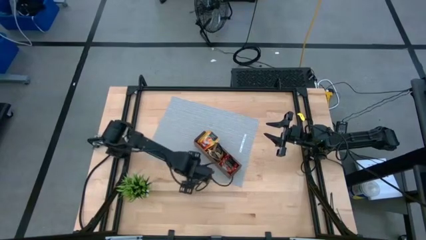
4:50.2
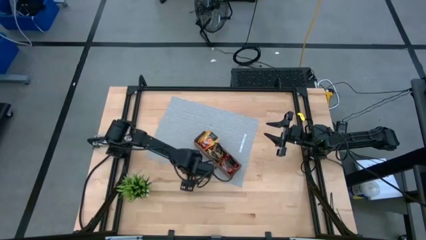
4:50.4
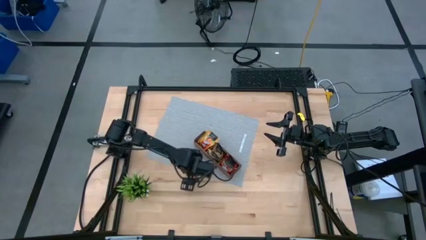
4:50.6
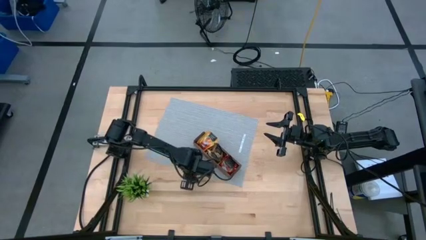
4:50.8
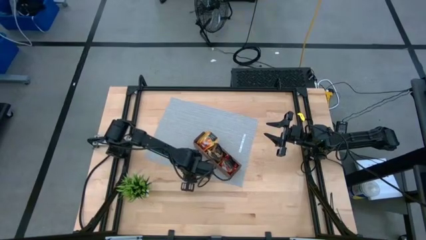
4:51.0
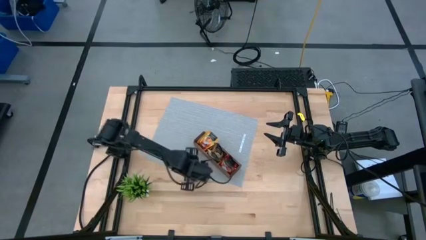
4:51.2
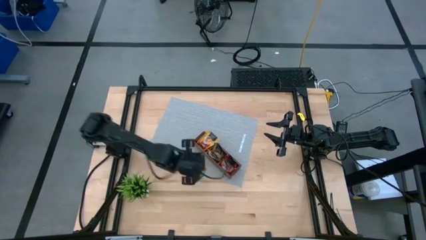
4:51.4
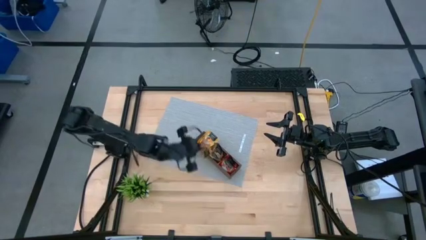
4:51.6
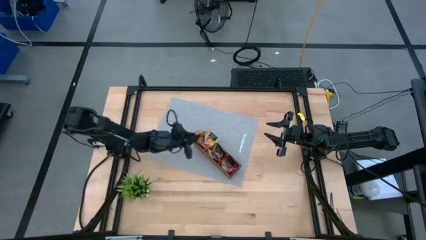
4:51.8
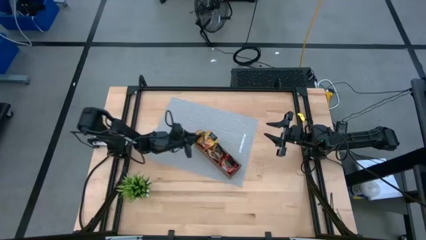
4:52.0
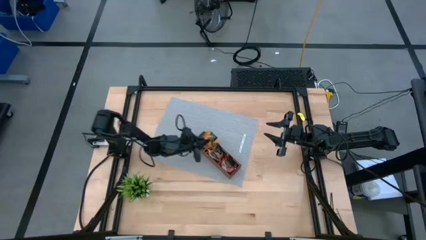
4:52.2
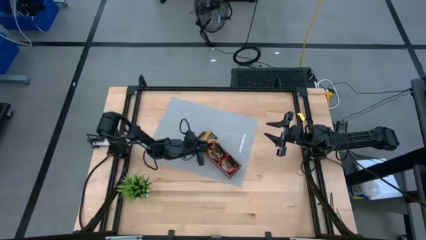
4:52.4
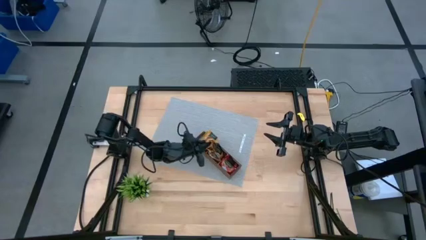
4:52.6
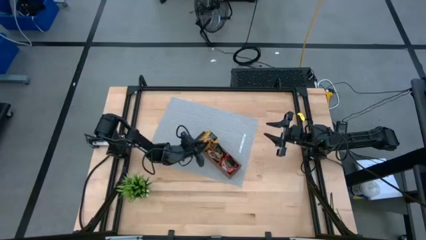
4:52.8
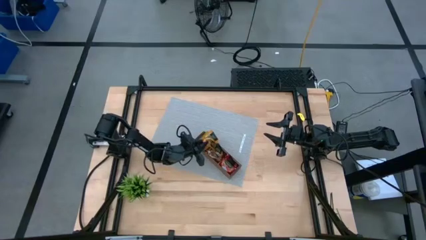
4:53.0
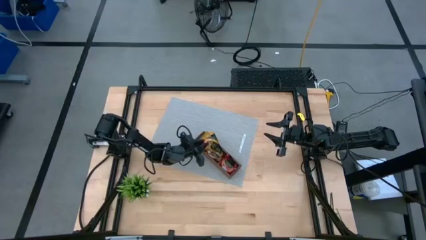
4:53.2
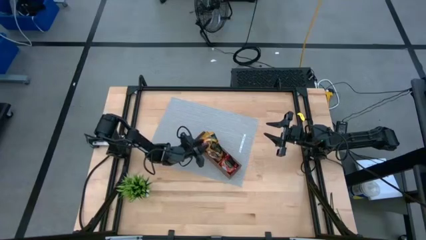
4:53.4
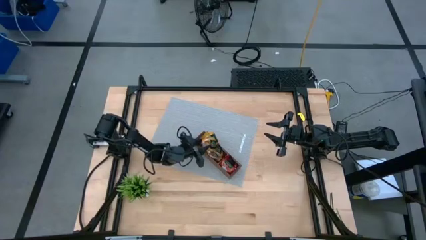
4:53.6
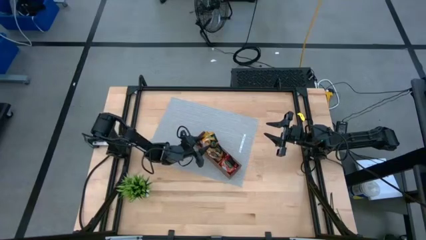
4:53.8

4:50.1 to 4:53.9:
Task: Pick & Place Tea
Put the yellow tea bag into the wooden organizer

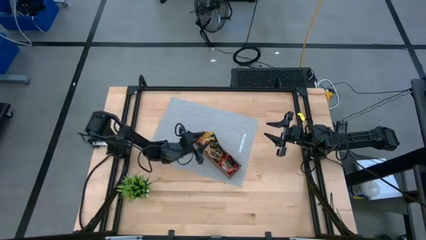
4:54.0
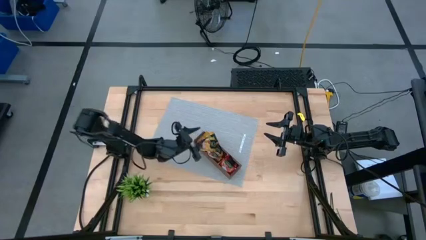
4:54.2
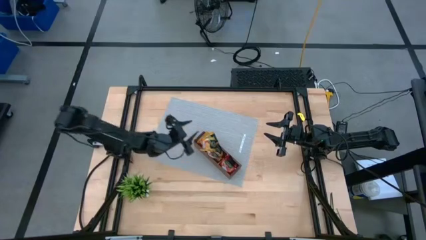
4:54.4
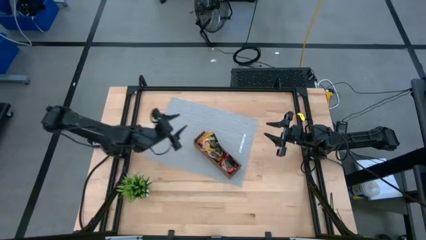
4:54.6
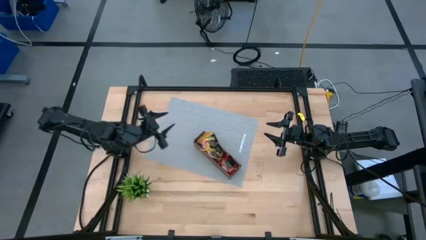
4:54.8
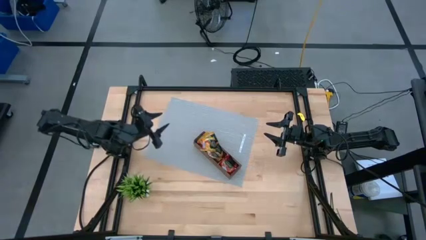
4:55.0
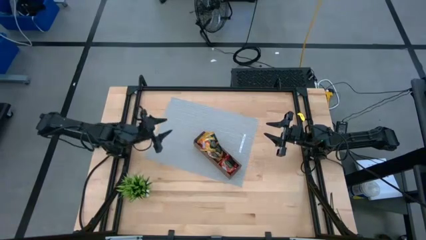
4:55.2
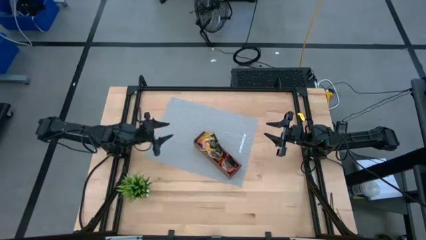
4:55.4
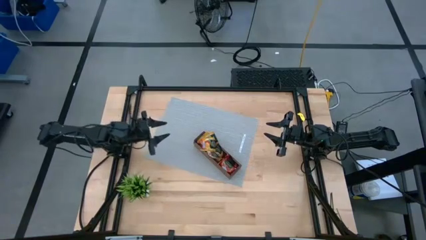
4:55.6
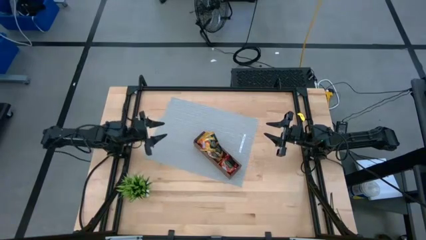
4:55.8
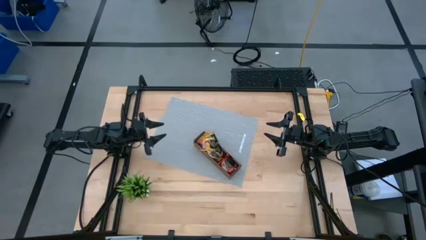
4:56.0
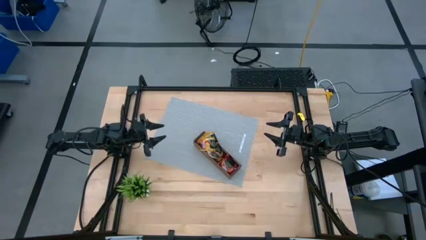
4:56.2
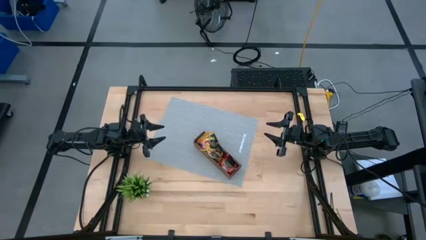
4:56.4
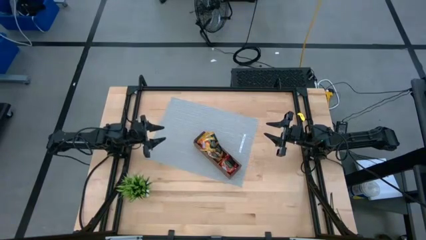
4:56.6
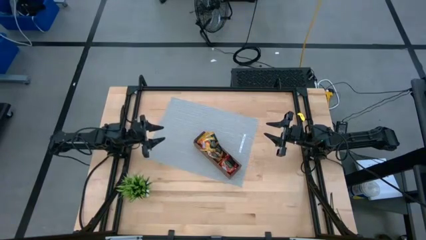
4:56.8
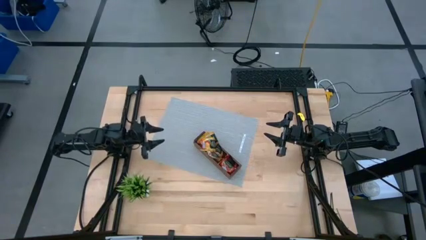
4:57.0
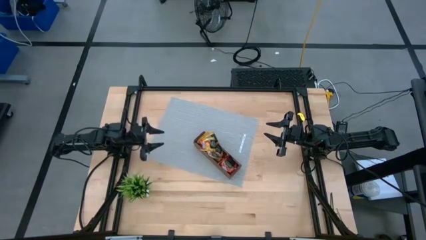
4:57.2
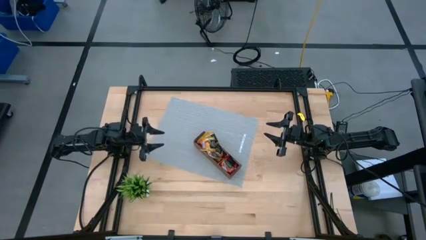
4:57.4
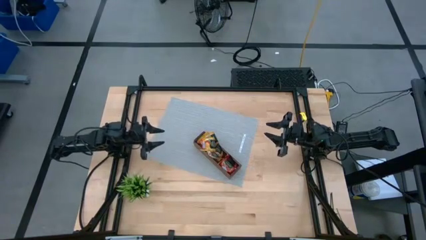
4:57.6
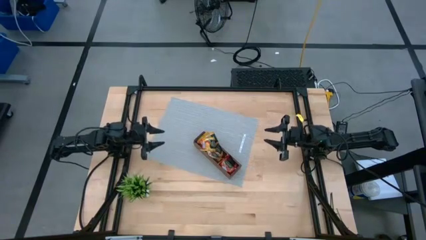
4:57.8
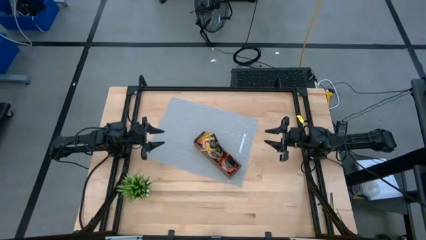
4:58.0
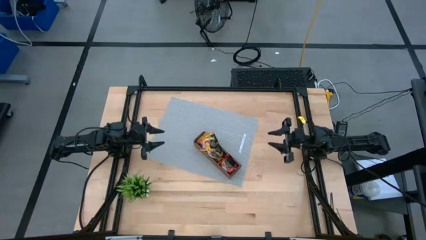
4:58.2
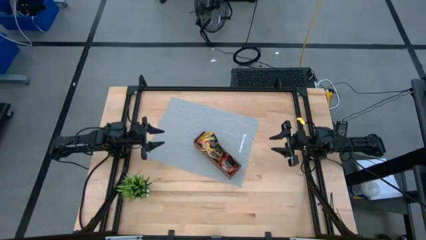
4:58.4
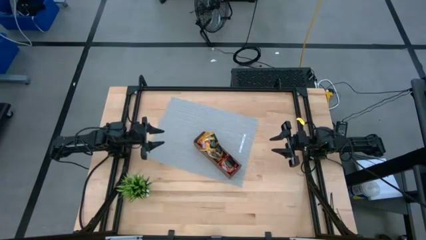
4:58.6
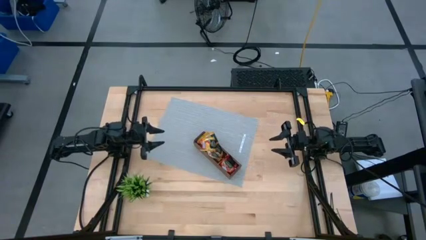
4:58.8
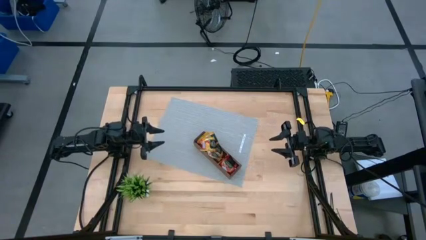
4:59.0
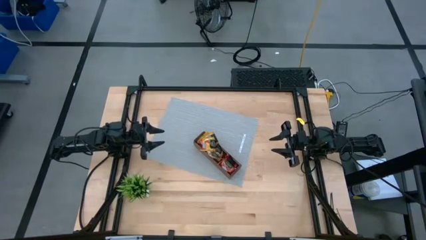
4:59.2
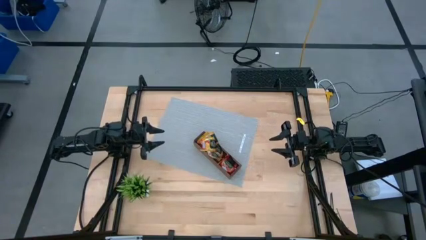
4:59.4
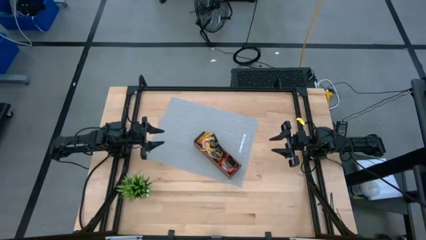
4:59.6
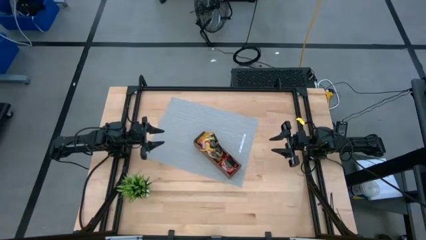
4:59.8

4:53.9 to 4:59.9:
Return to Home Position

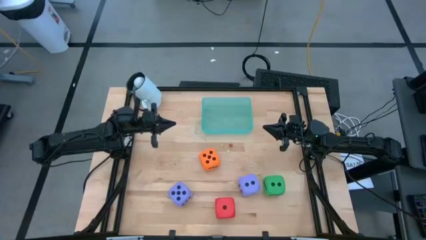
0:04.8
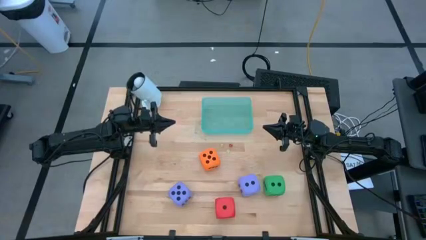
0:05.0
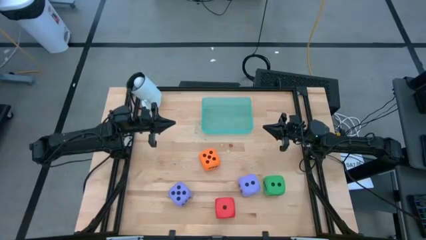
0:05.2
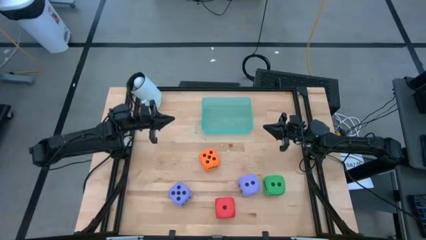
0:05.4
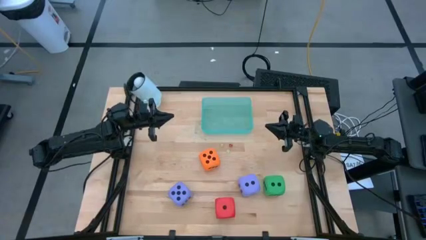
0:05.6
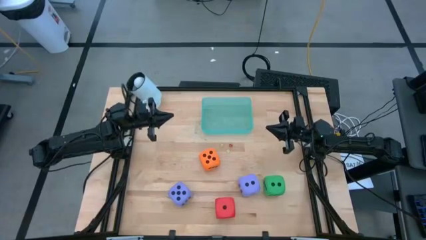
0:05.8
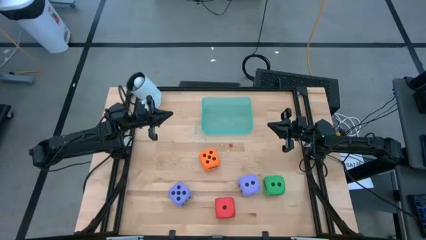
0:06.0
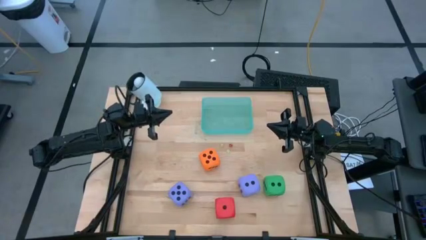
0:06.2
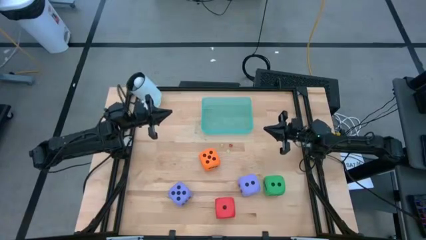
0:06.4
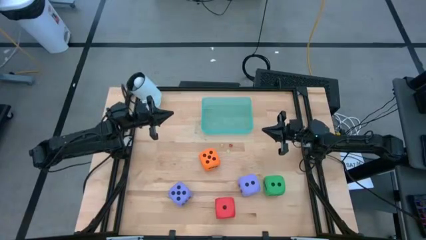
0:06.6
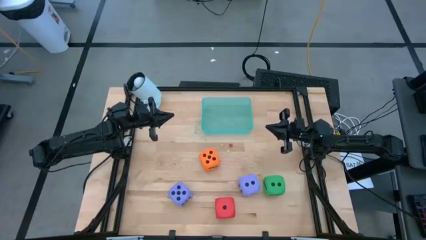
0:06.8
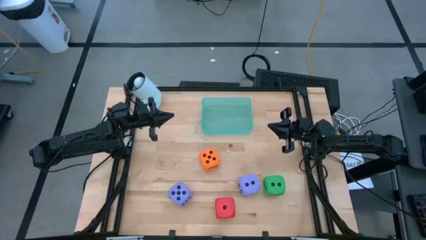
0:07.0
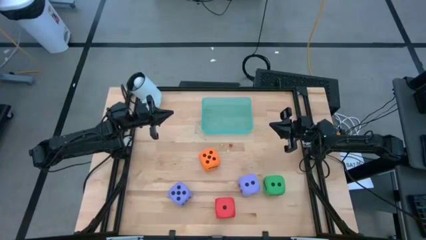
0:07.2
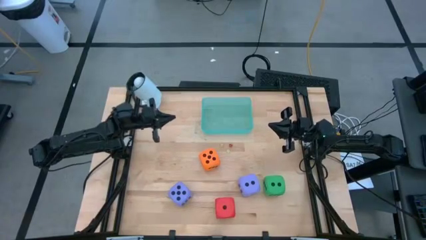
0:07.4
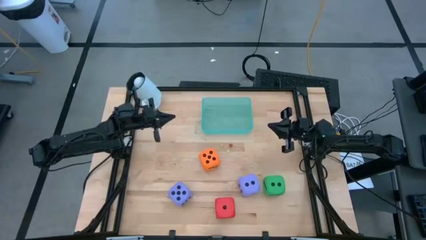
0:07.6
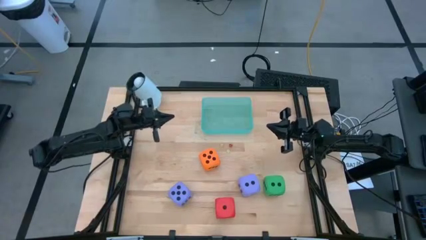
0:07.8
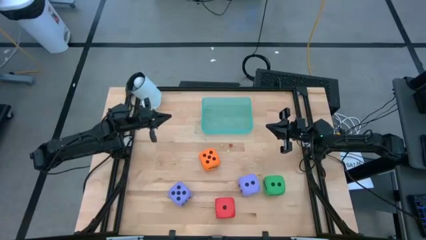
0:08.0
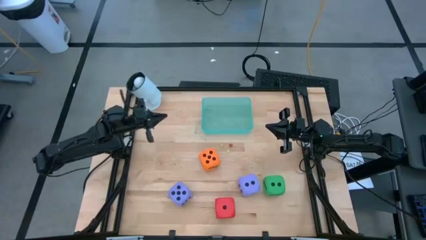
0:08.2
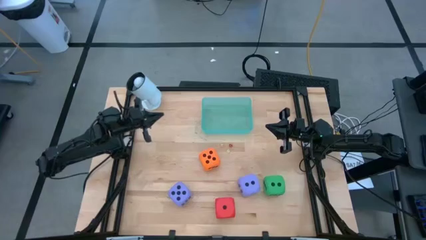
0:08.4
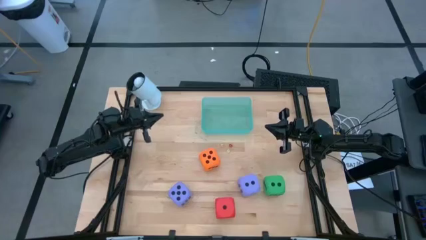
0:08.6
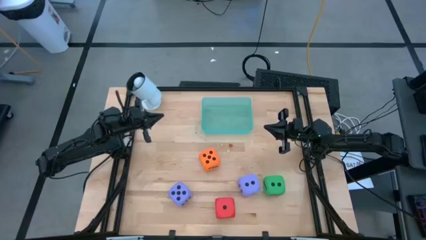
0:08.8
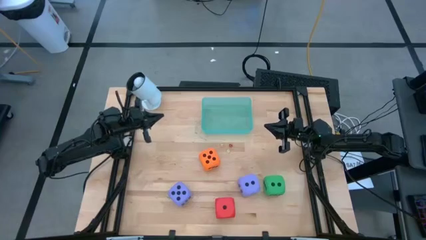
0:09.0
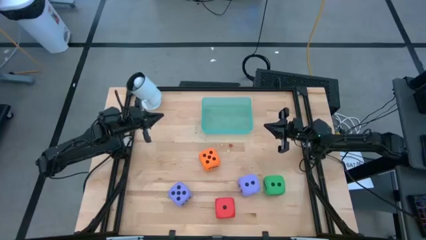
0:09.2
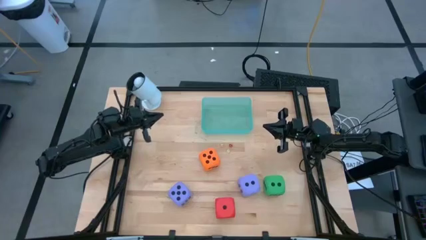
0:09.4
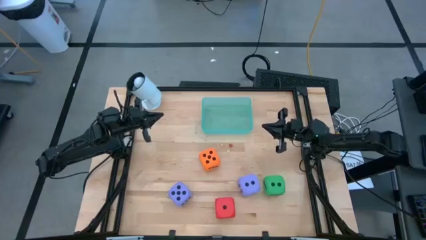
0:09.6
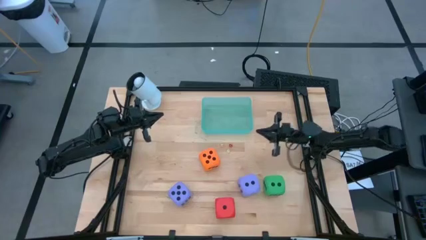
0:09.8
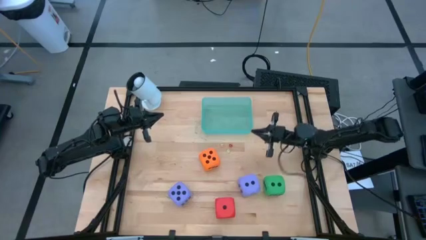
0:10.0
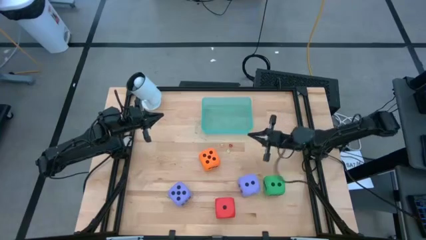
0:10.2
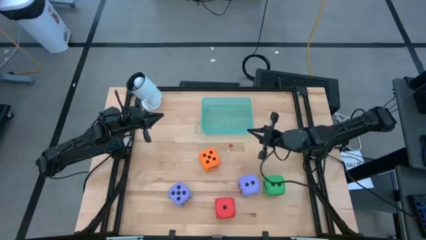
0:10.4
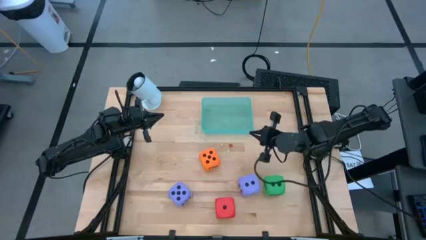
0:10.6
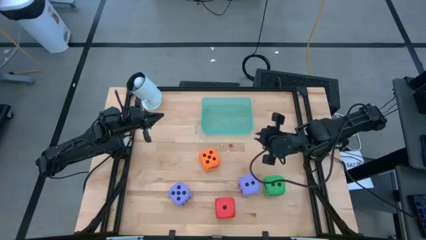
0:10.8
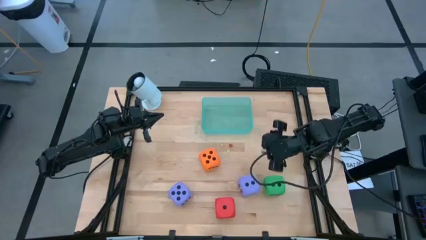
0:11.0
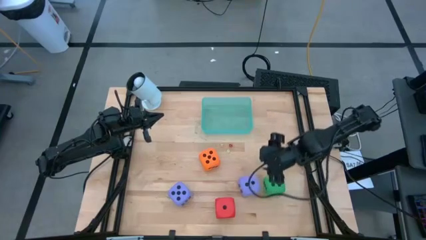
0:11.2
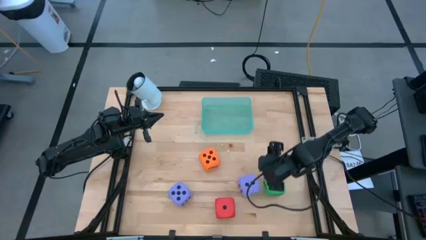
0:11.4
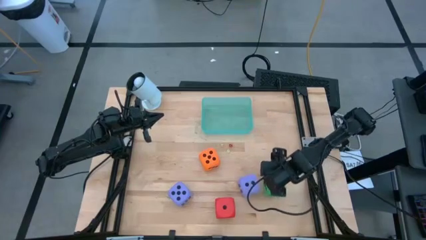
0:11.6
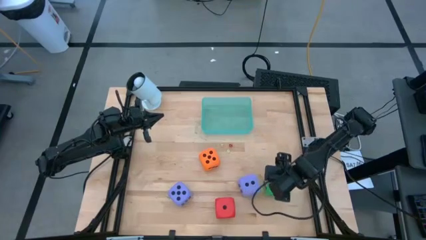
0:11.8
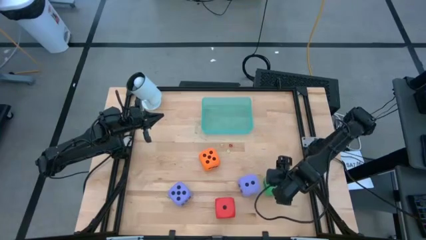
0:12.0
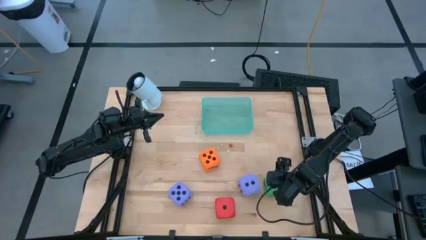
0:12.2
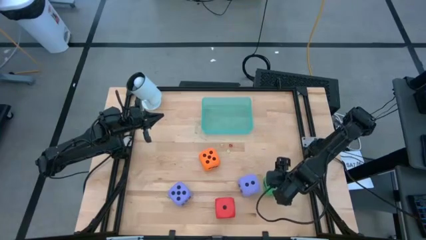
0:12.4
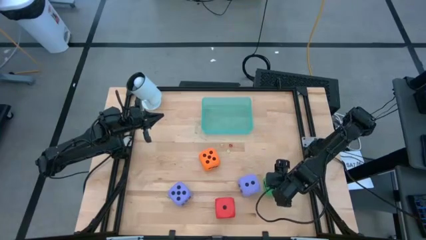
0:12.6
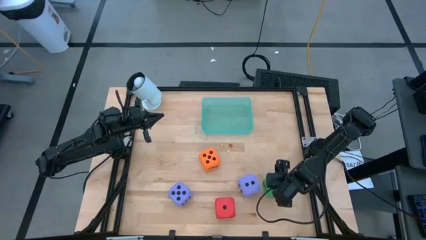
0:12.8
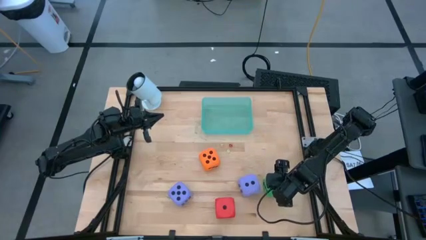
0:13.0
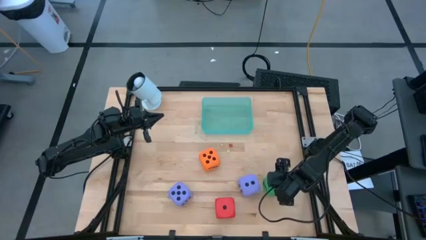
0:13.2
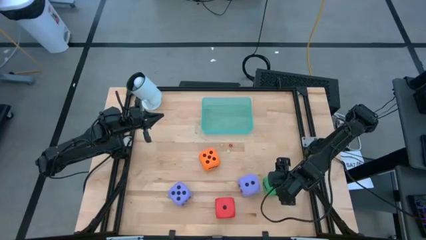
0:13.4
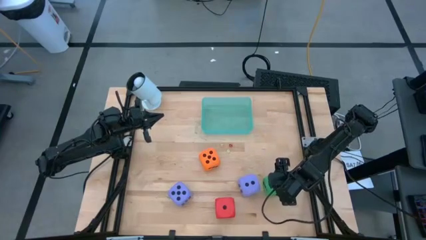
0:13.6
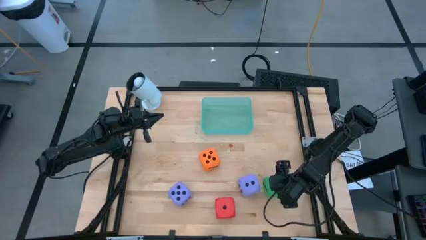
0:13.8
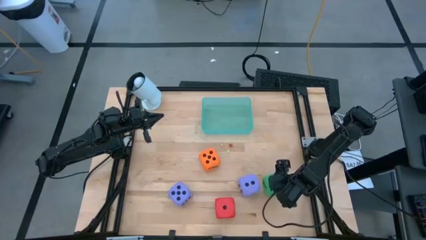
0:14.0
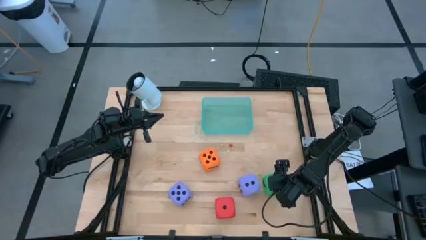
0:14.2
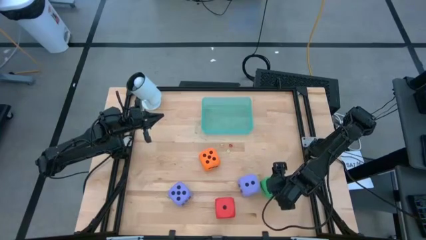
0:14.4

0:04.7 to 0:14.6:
Task: Pick & Place Dice
Put the large green dice into the light blue bin
